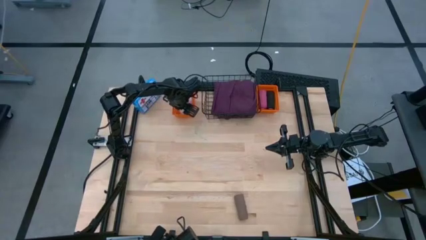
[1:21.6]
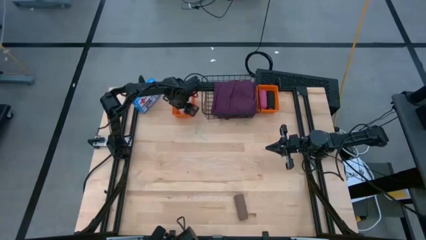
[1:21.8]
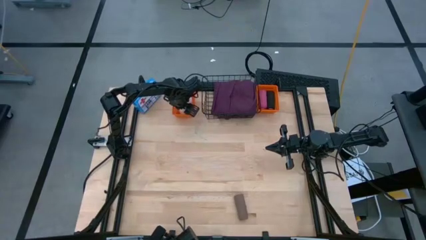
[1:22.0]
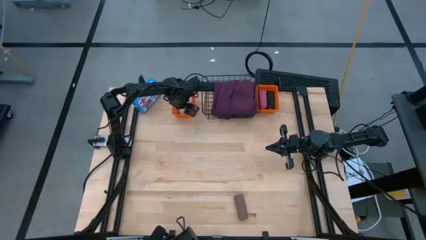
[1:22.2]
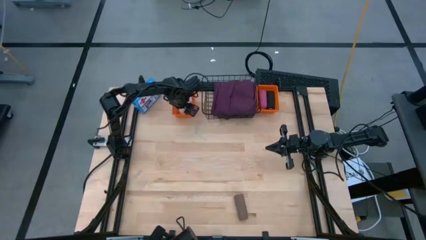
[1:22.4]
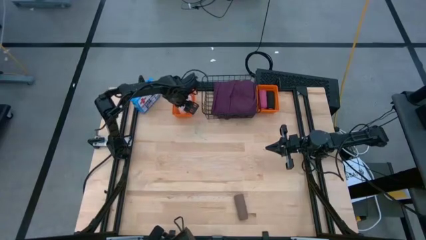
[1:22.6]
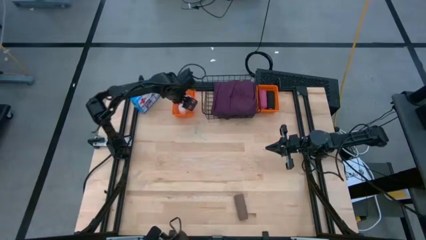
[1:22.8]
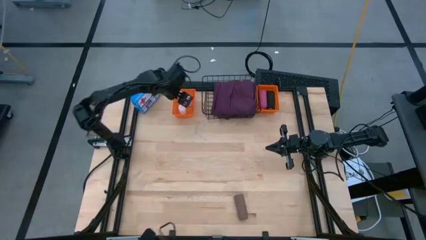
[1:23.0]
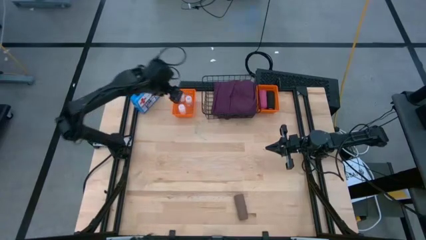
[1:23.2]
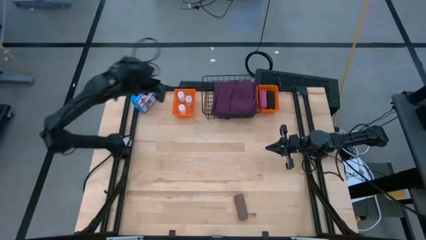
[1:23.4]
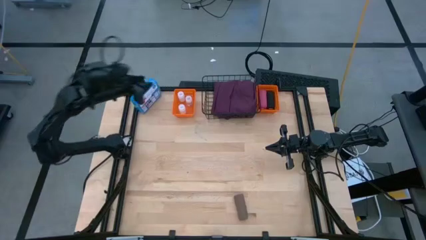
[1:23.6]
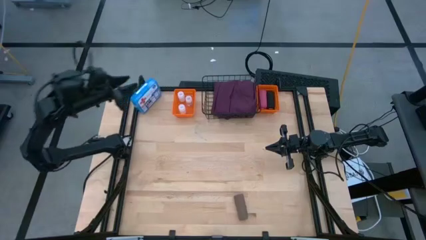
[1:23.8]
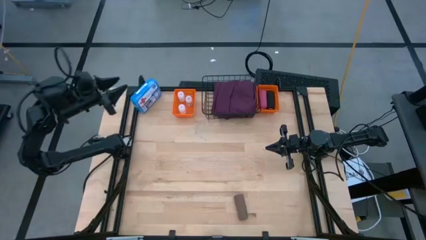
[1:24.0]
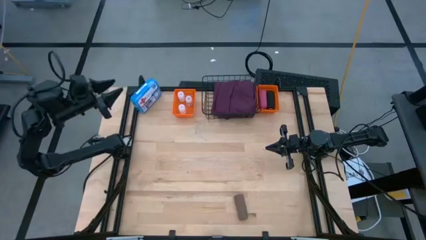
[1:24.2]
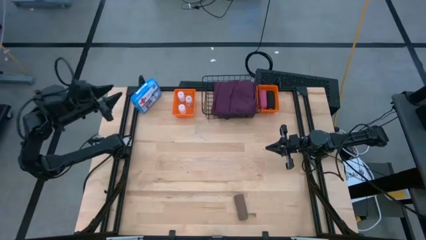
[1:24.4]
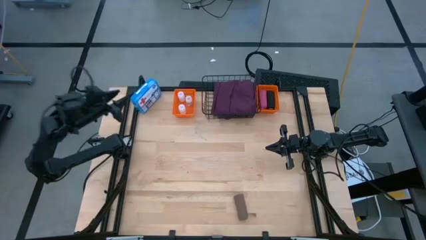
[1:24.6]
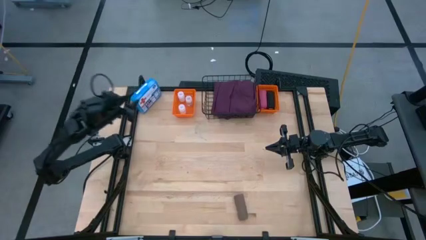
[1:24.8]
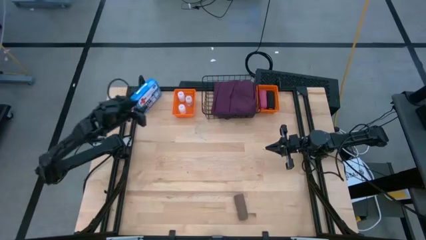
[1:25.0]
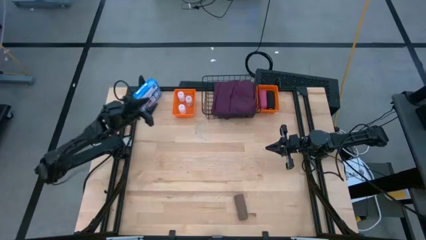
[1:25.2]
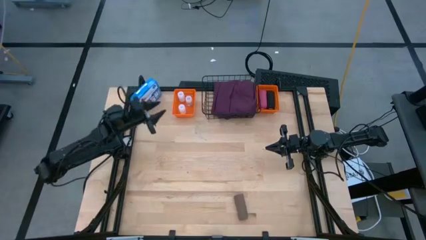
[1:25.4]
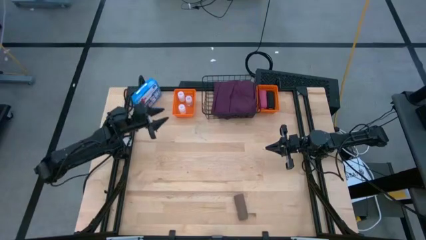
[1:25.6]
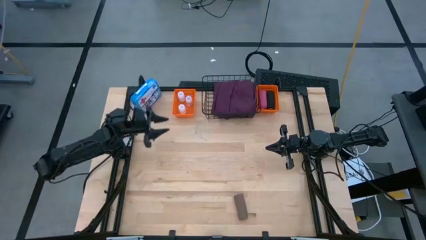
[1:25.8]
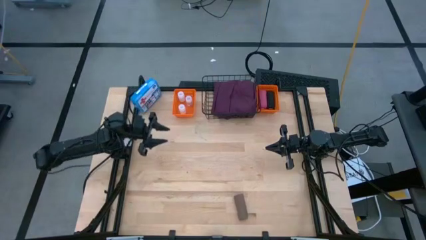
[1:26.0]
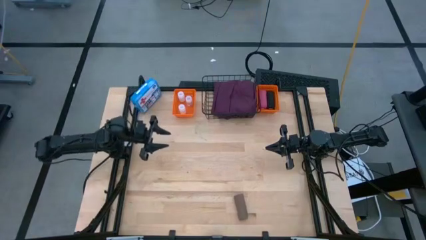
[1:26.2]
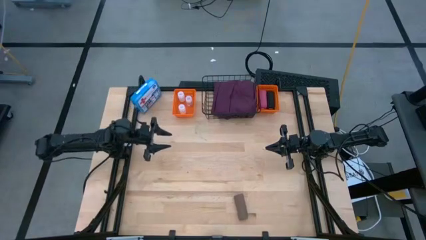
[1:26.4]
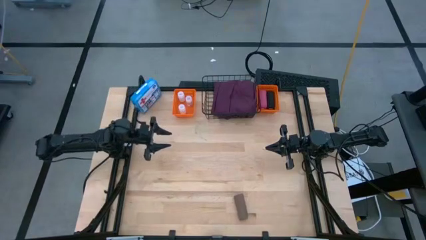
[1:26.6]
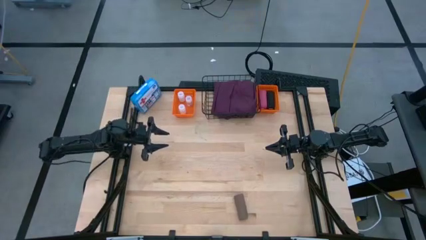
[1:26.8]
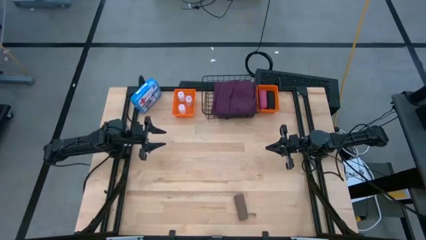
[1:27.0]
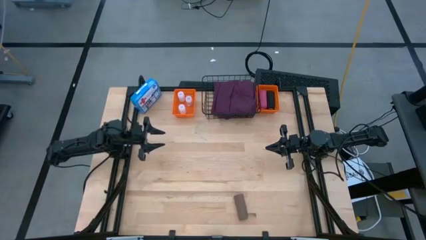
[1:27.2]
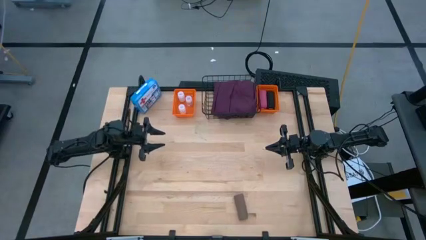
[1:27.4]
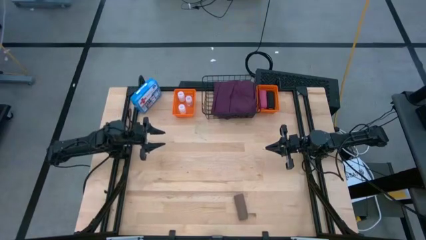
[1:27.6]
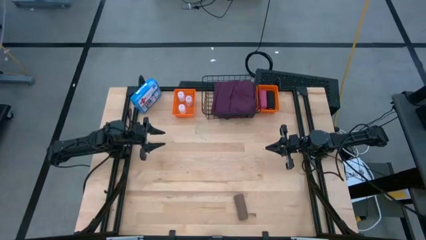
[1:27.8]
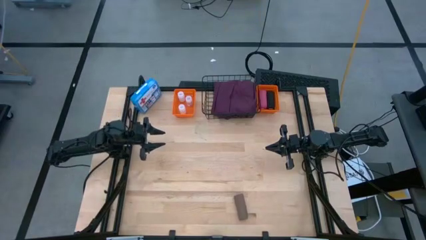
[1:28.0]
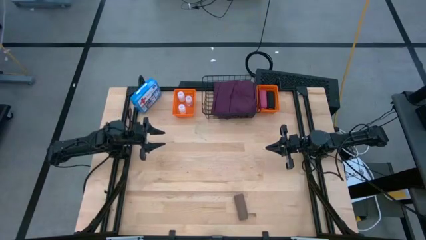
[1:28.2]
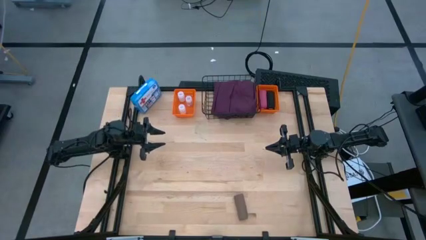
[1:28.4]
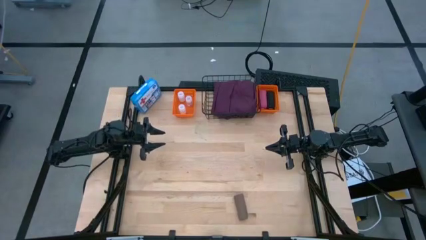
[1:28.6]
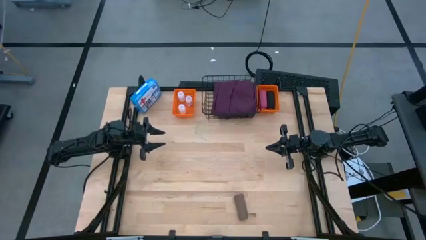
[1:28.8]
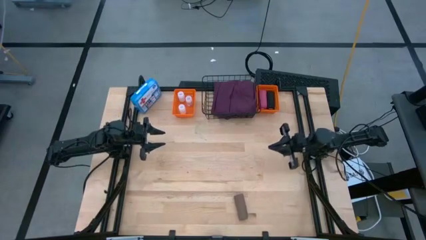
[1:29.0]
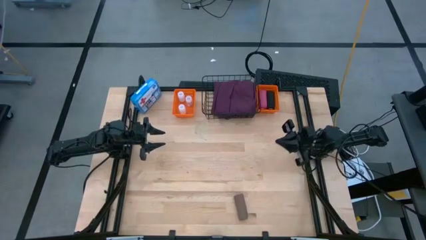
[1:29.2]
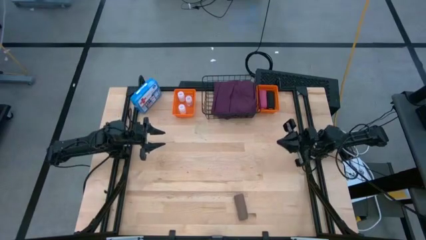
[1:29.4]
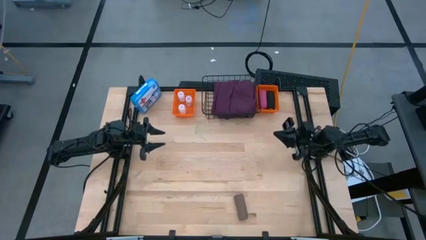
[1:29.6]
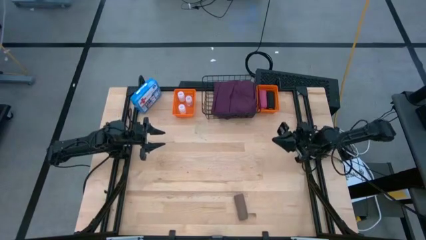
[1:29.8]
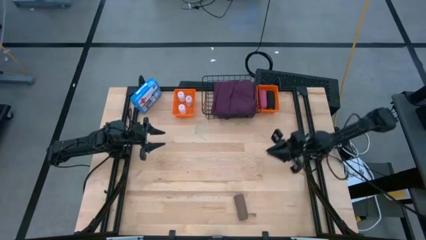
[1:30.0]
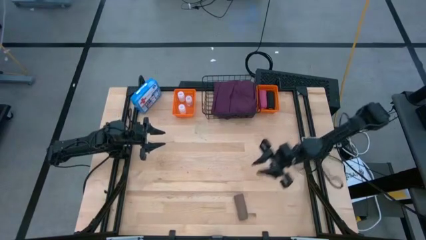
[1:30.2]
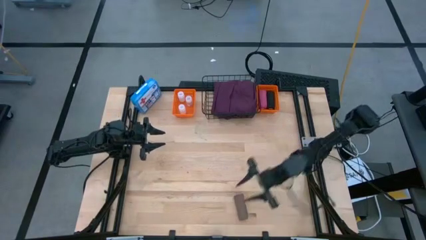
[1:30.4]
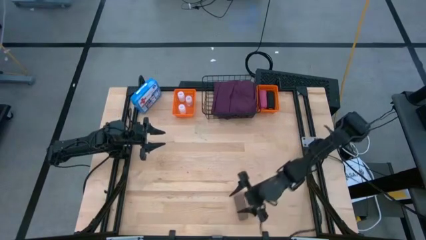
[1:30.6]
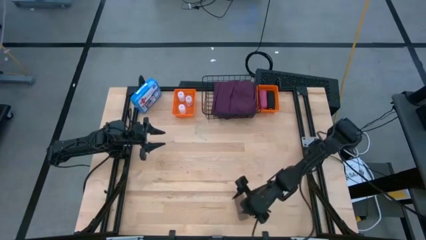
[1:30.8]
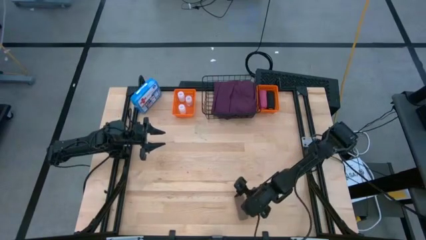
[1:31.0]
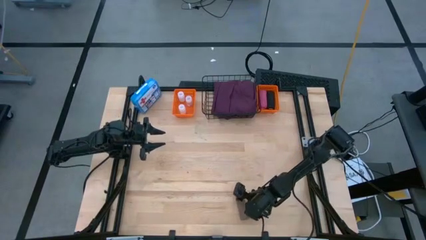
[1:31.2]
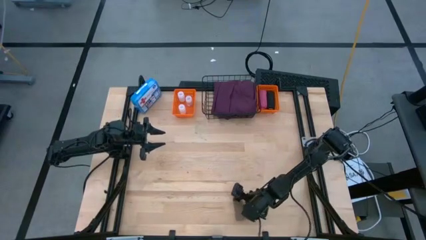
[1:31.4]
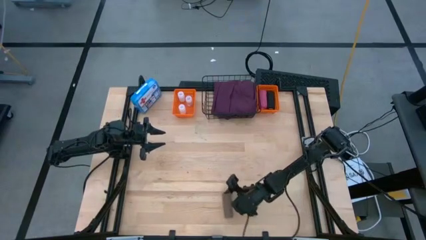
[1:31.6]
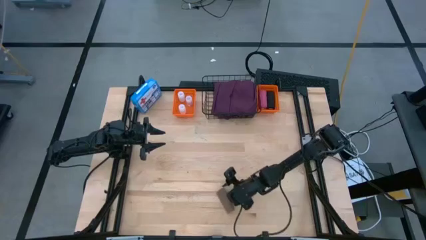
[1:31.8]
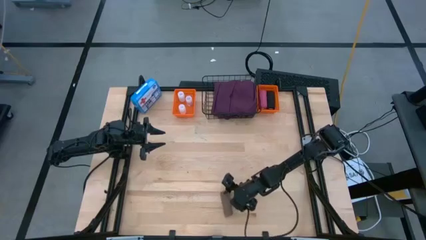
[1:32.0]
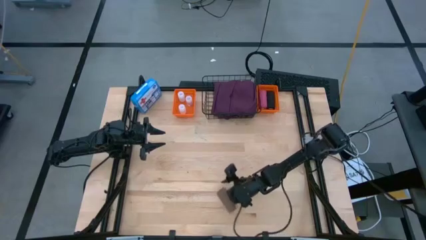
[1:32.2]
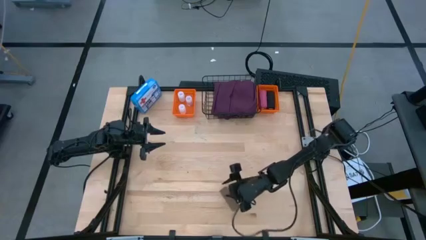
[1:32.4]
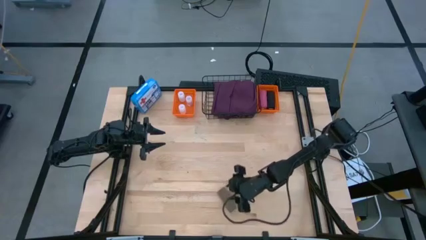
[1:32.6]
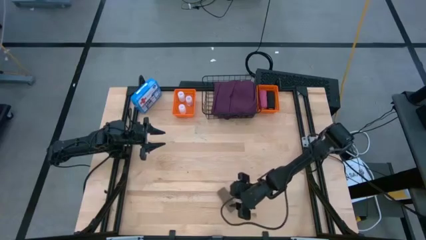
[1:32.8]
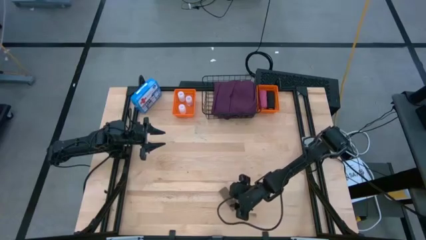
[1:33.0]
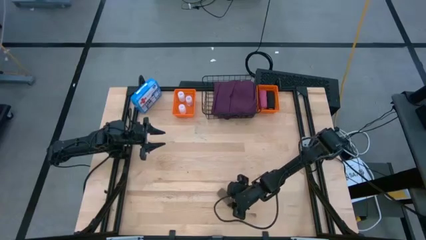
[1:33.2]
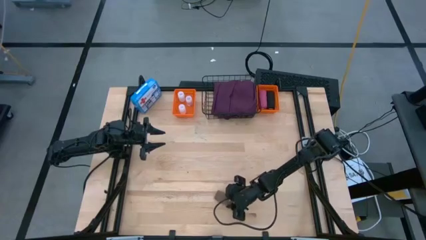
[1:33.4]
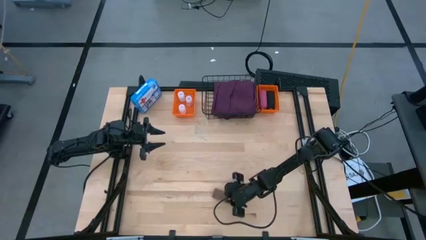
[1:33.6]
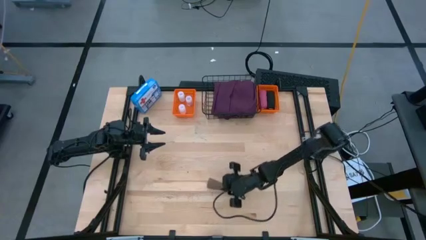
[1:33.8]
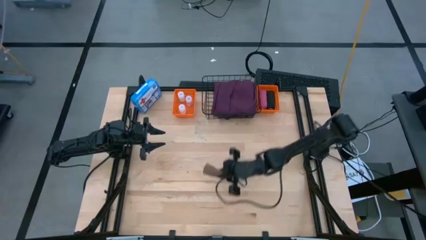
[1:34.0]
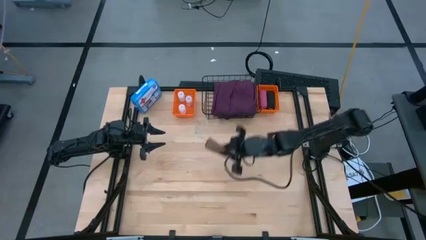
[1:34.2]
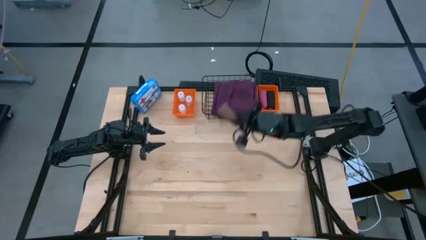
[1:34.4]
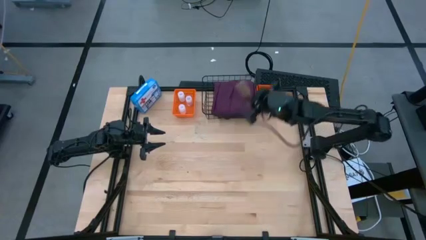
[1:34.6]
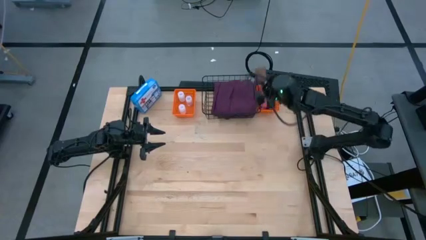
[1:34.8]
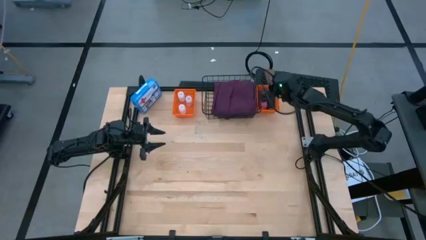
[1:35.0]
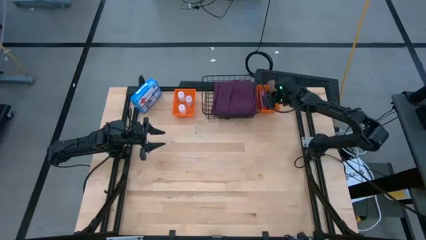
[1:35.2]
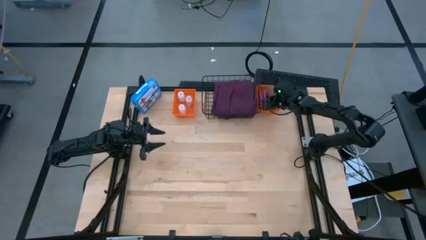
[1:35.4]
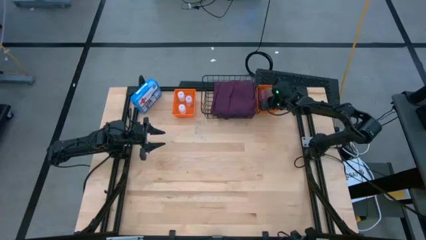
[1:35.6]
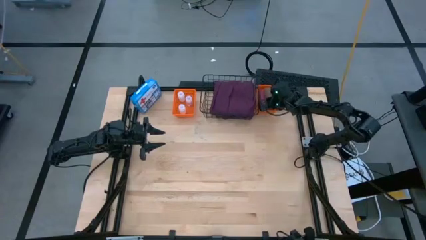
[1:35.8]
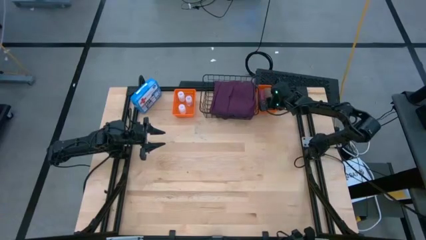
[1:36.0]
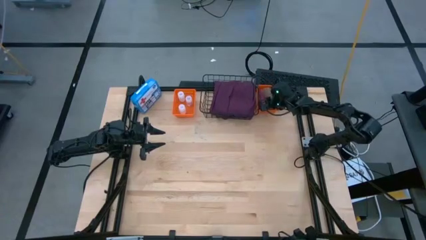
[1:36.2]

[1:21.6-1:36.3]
Task: Pick & place medical supplies in basket/bin
Put the brown bandage into the right orange bin
